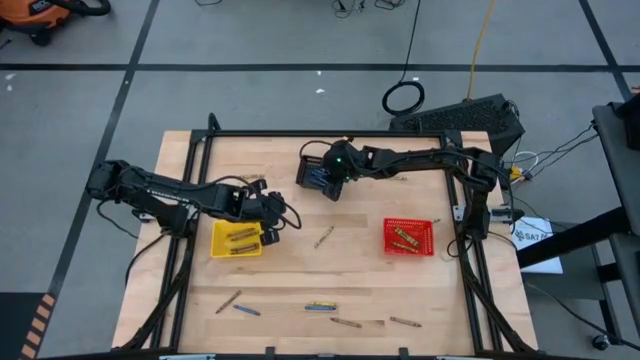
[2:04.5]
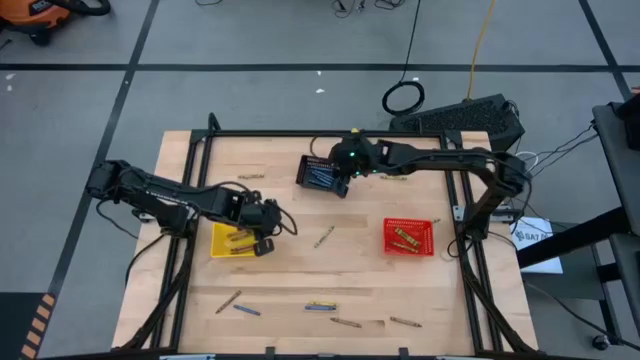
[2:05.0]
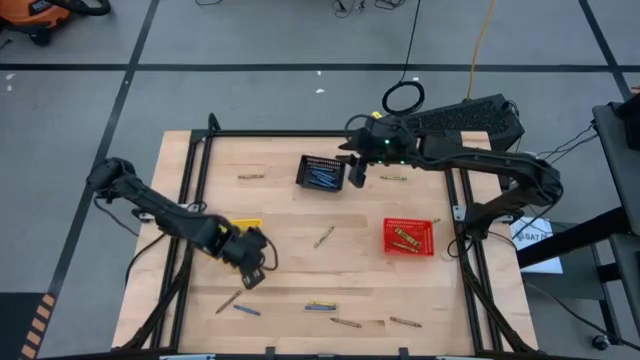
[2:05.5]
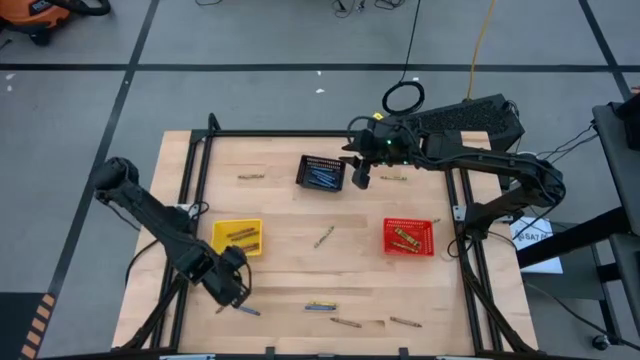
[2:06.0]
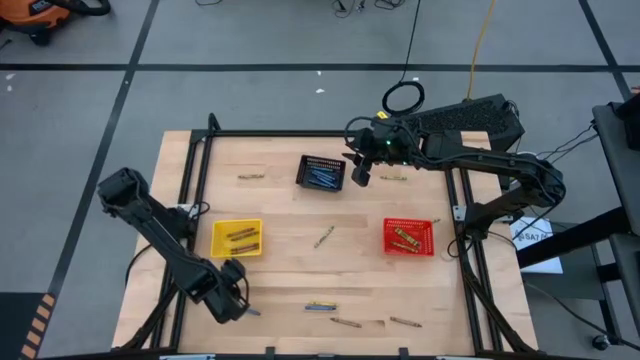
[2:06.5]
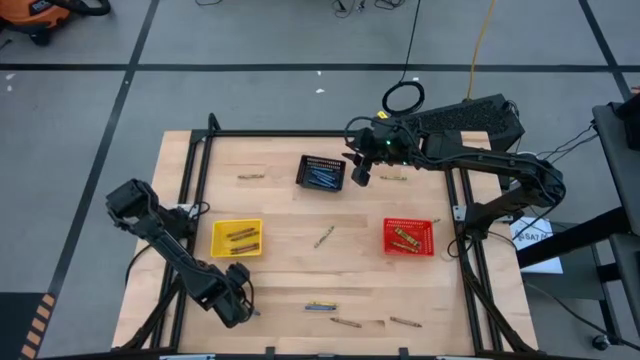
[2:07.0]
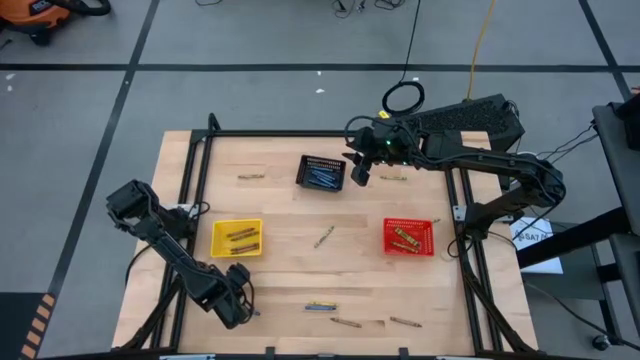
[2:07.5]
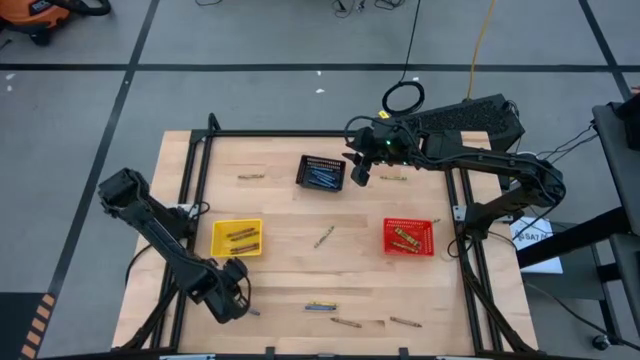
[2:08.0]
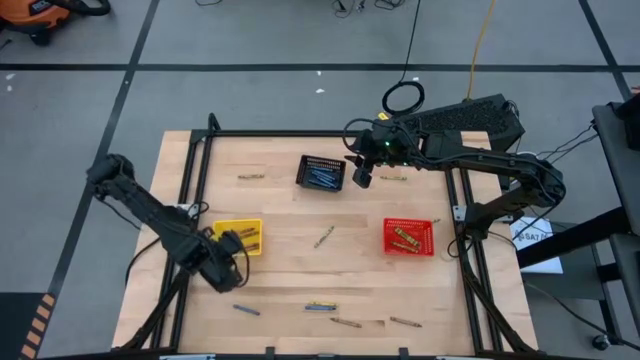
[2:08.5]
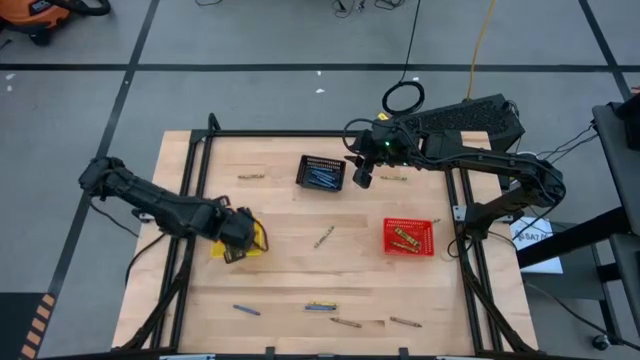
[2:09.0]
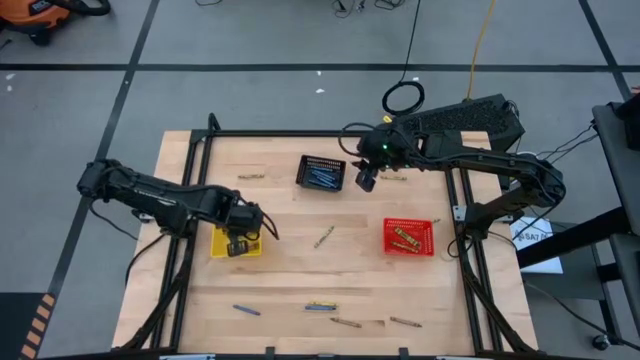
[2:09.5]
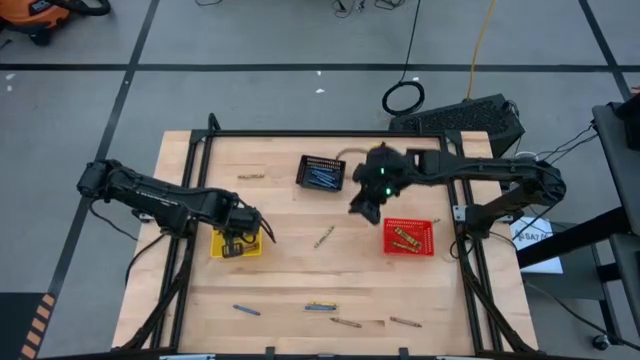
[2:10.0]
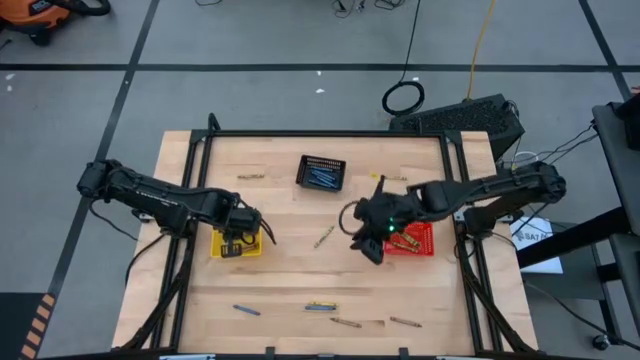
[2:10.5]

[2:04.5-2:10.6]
Task: Sort crayons
Put the brown crayon into the yellow bin

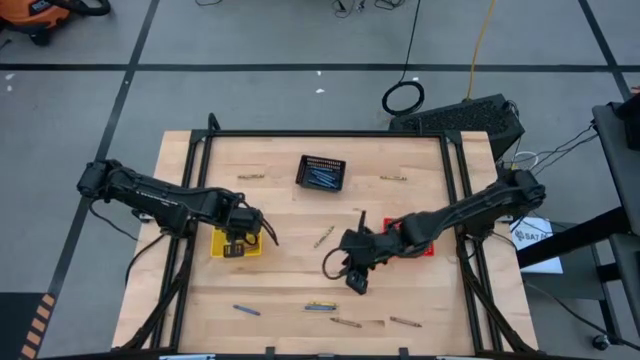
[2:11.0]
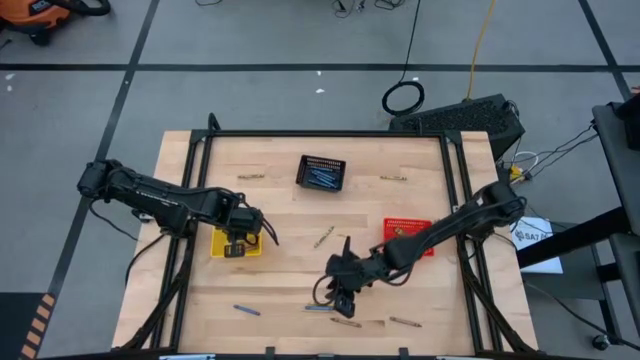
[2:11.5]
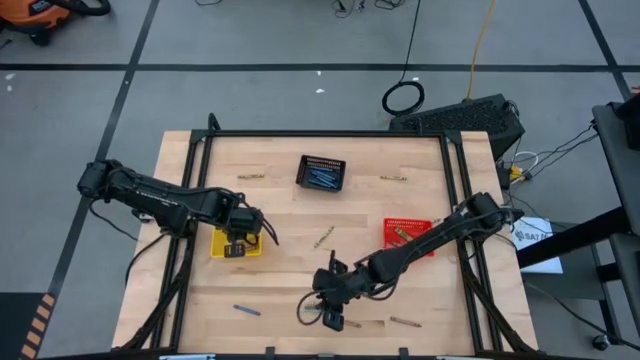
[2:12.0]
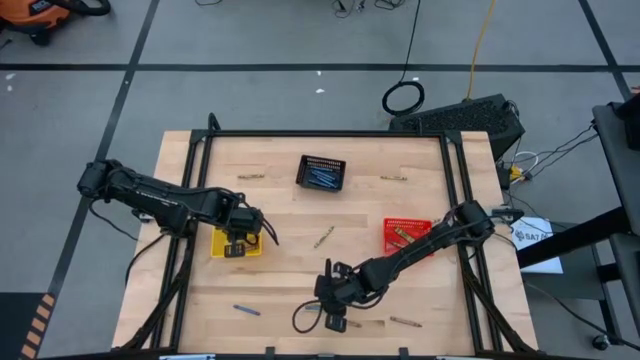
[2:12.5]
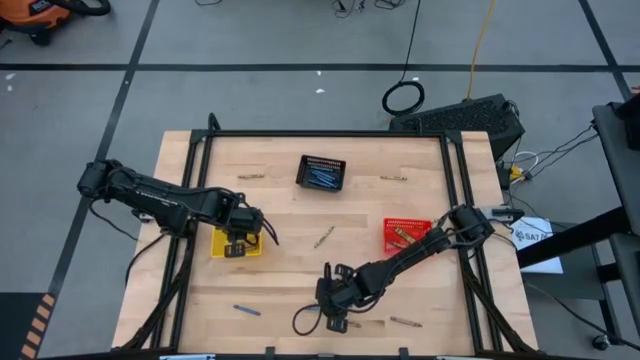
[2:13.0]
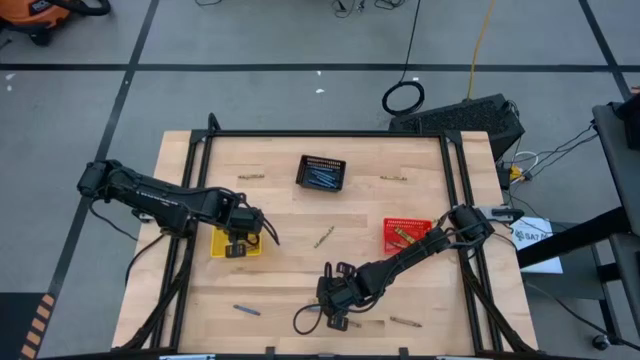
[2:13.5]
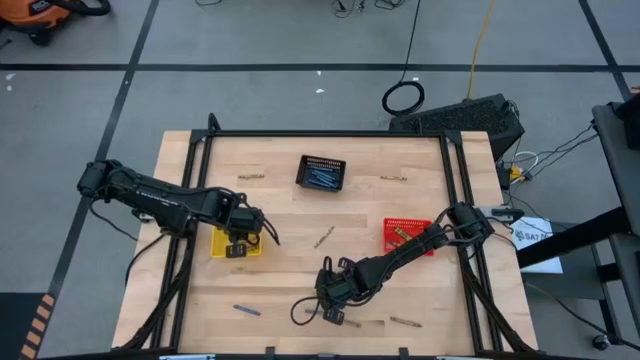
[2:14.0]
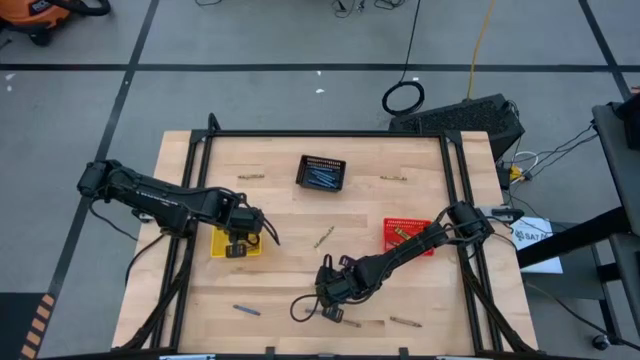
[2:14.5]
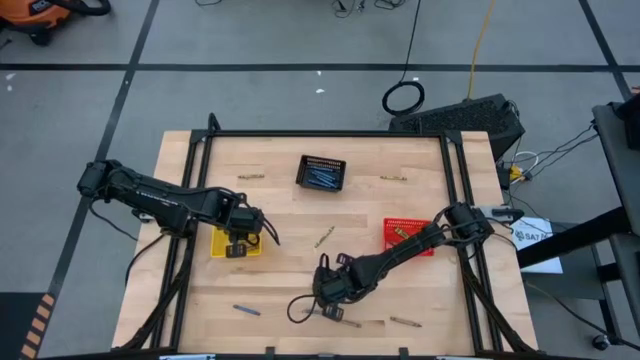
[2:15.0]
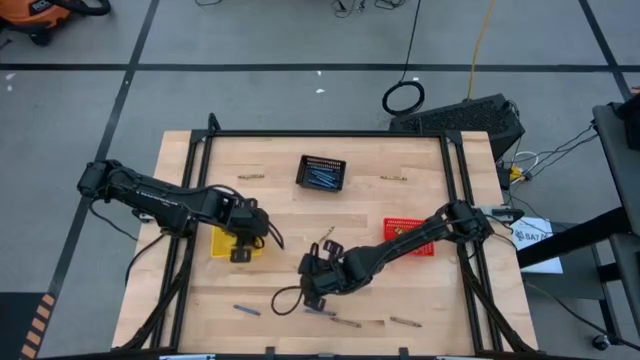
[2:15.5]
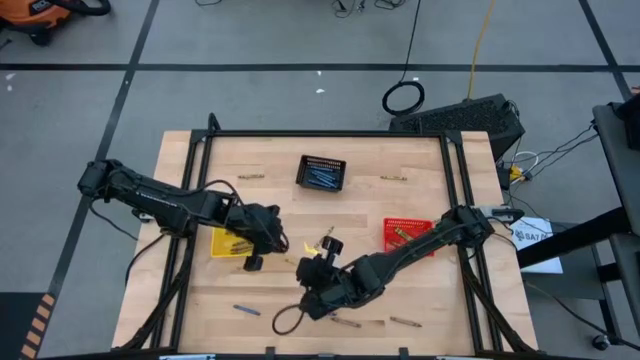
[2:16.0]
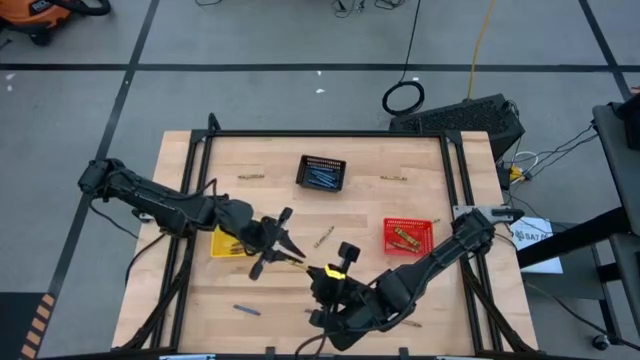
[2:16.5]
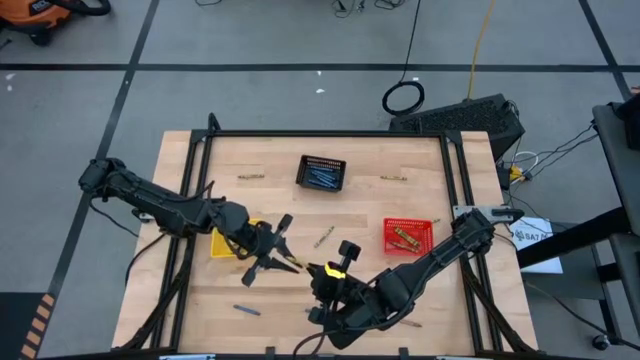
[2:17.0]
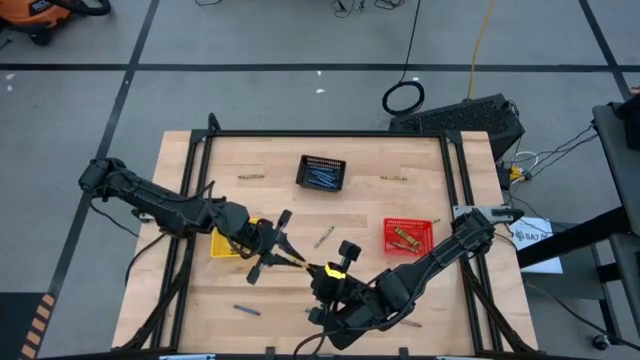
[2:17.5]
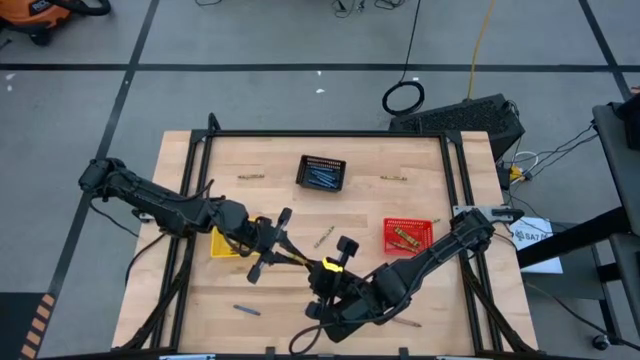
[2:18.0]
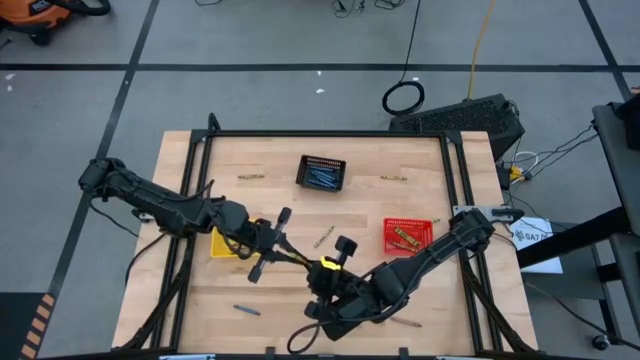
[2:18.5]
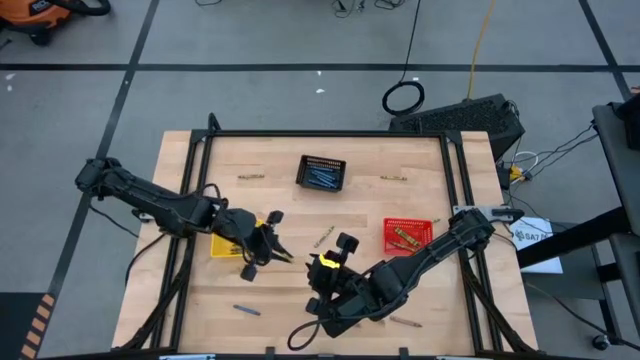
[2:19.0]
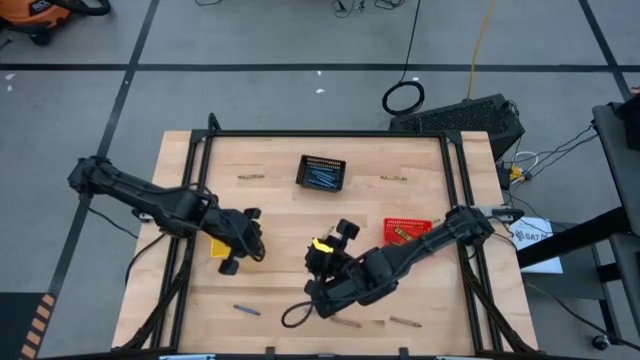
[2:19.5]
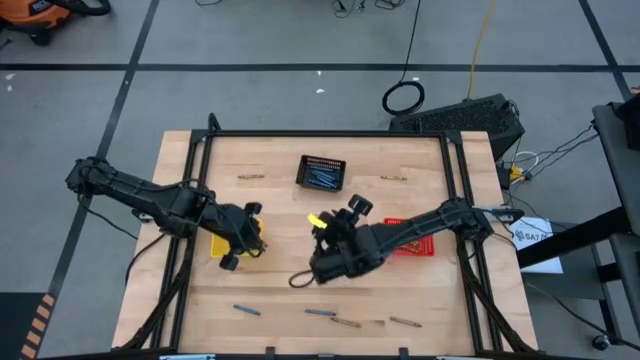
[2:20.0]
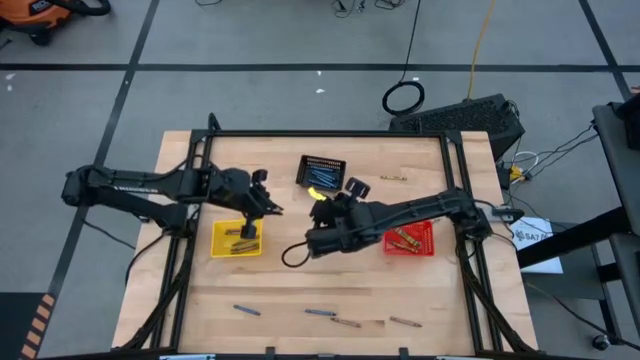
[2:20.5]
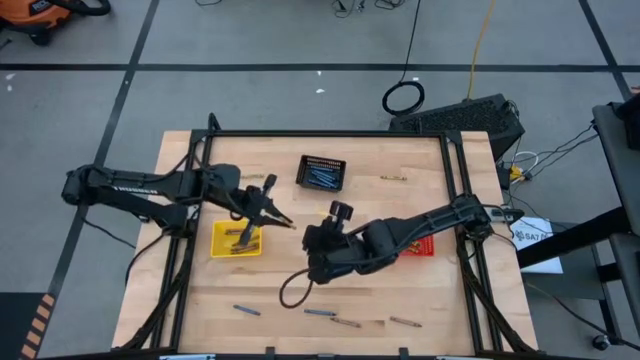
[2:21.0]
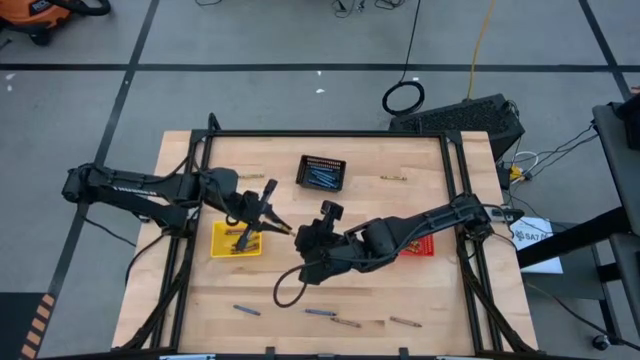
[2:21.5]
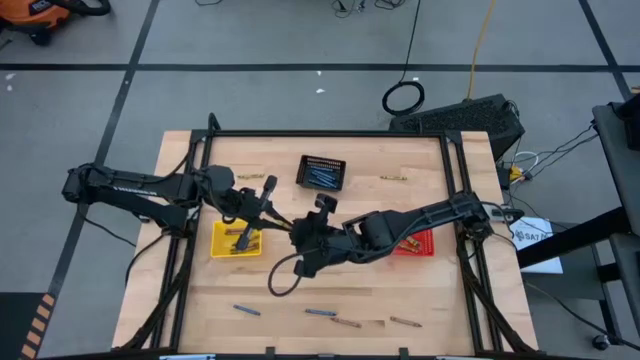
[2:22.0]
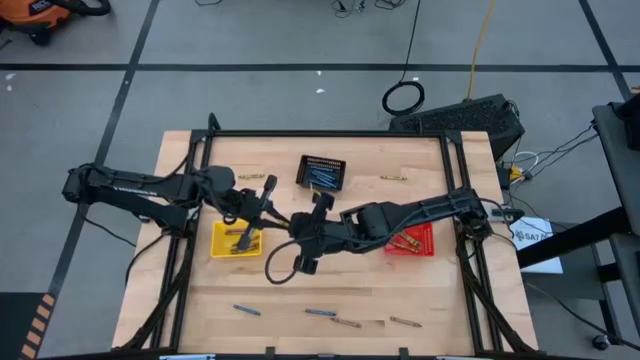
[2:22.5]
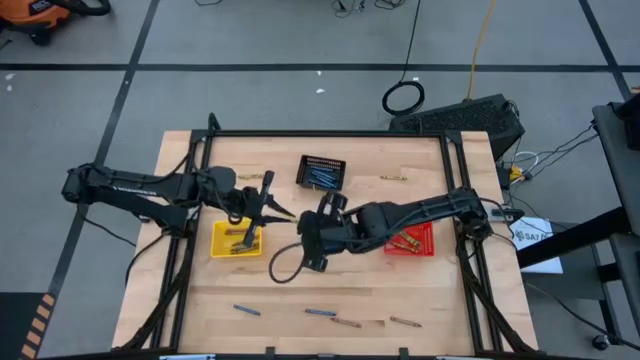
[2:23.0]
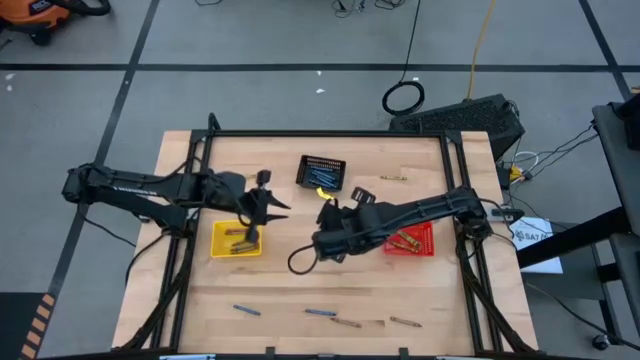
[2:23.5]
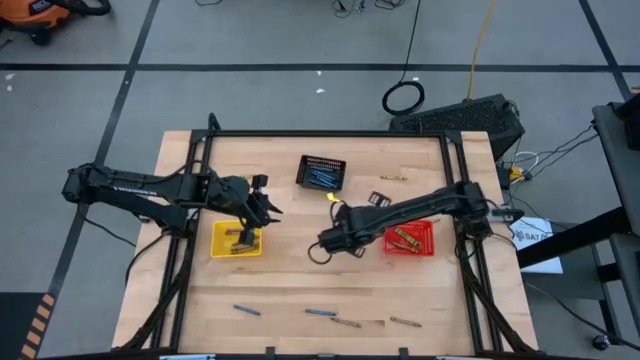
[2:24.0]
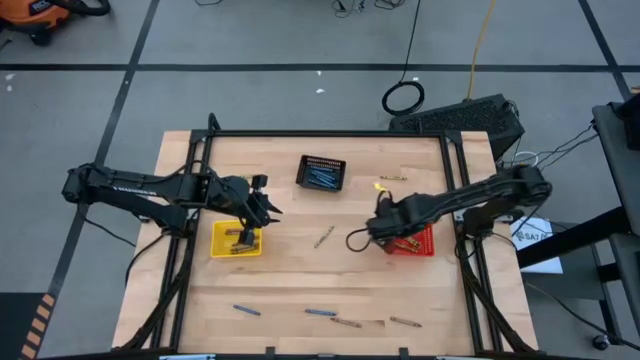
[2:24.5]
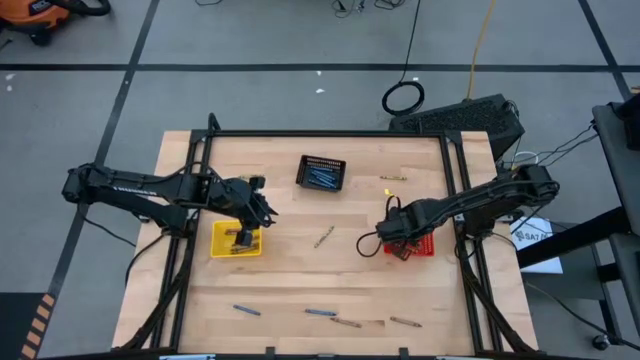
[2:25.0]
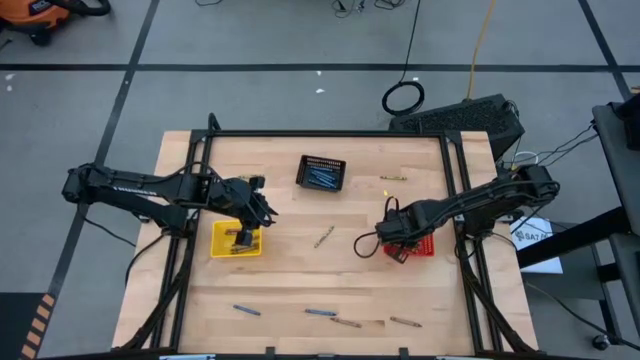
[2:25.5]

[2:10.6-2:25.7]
Put the yellow green crayon into the red bin
